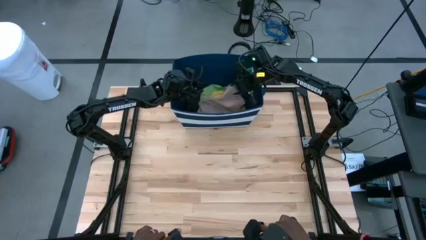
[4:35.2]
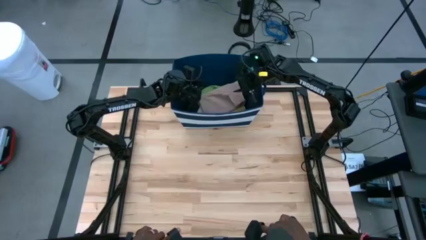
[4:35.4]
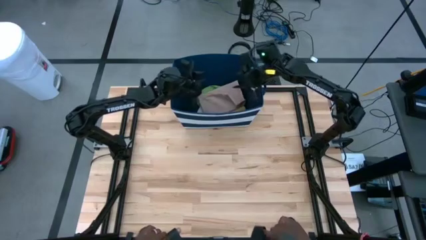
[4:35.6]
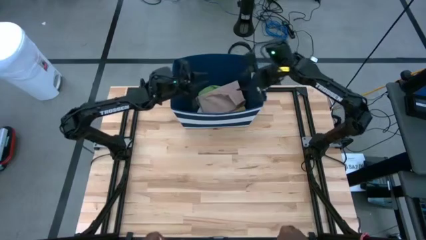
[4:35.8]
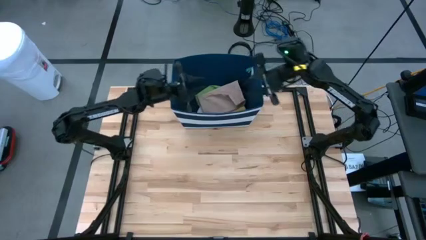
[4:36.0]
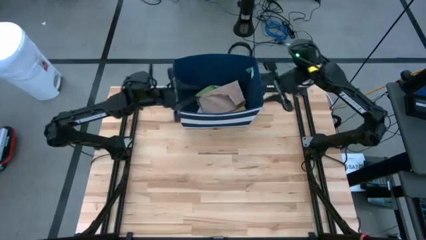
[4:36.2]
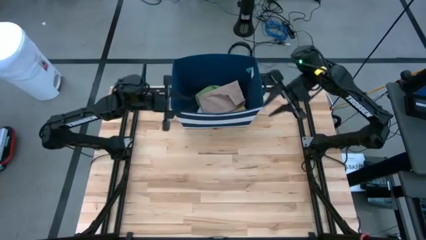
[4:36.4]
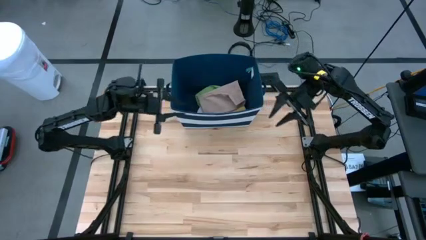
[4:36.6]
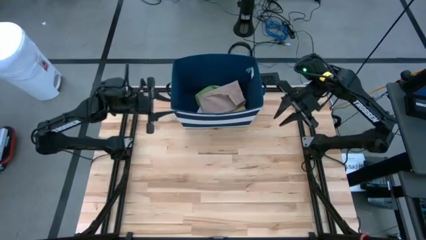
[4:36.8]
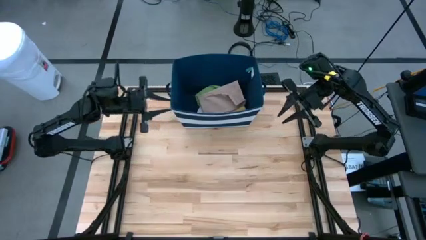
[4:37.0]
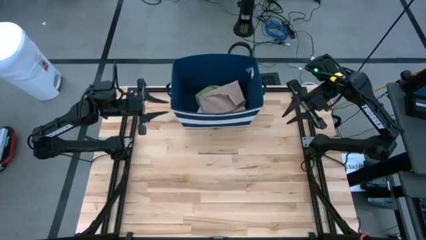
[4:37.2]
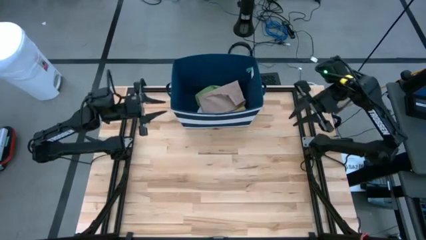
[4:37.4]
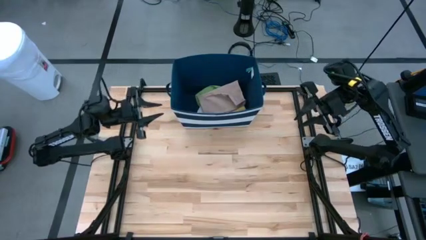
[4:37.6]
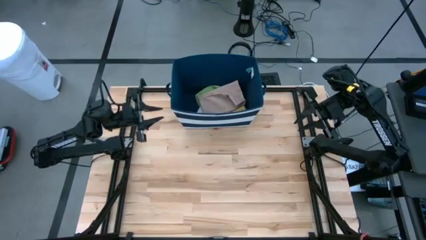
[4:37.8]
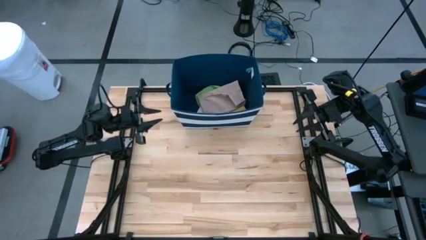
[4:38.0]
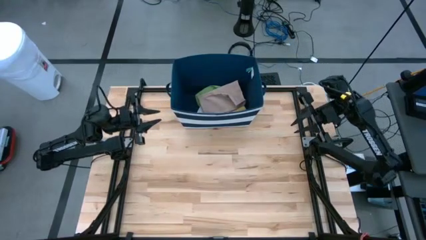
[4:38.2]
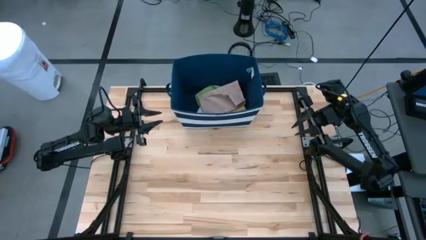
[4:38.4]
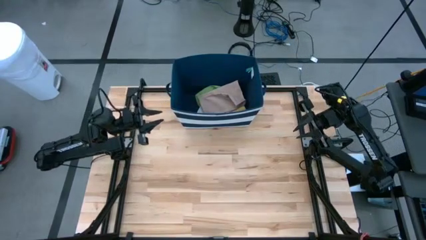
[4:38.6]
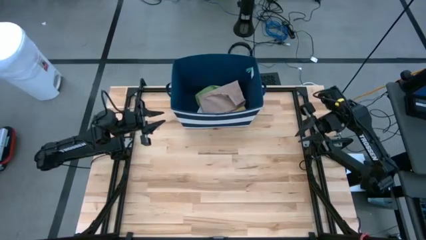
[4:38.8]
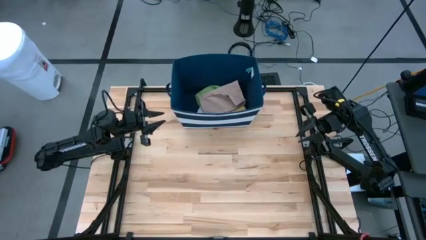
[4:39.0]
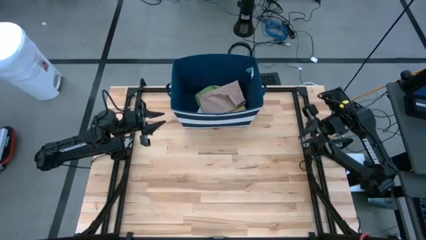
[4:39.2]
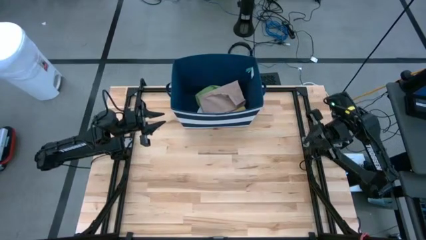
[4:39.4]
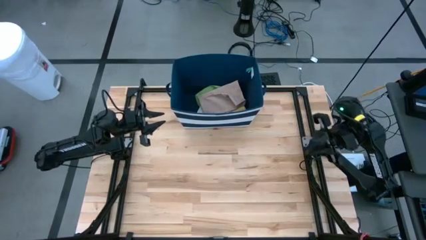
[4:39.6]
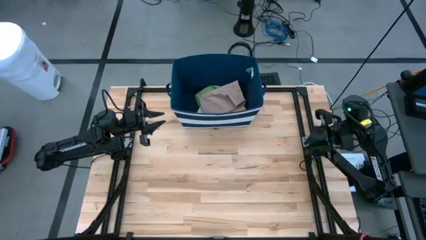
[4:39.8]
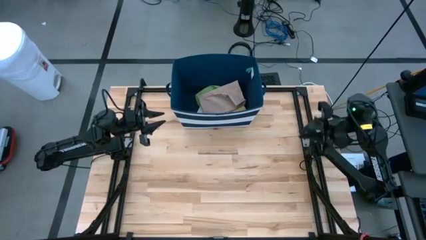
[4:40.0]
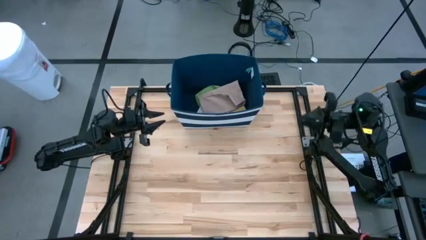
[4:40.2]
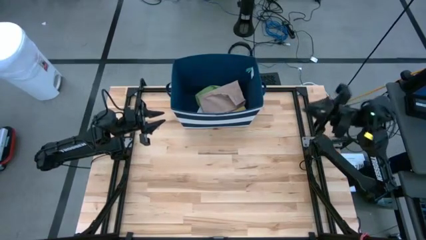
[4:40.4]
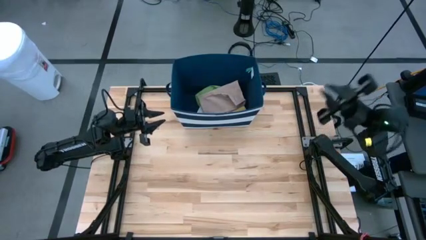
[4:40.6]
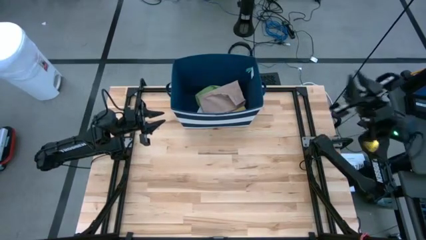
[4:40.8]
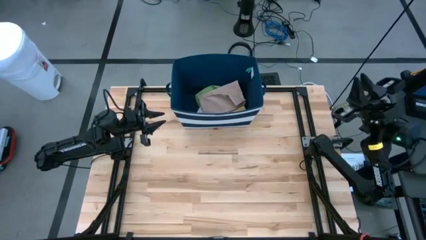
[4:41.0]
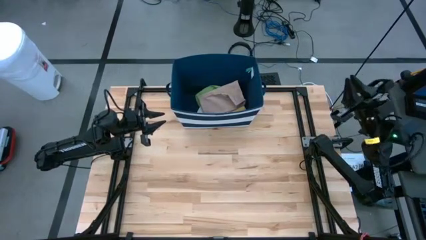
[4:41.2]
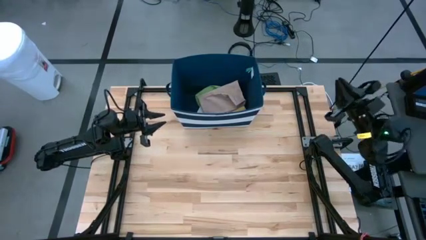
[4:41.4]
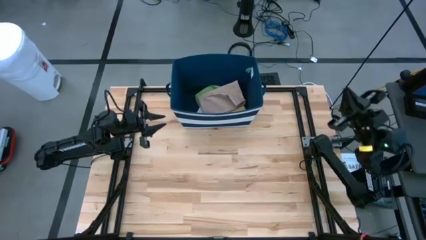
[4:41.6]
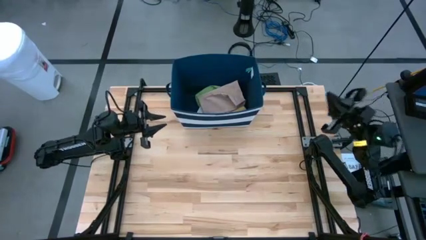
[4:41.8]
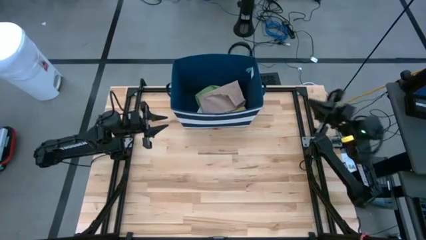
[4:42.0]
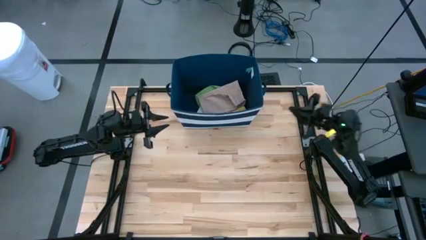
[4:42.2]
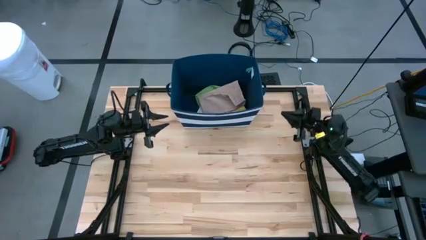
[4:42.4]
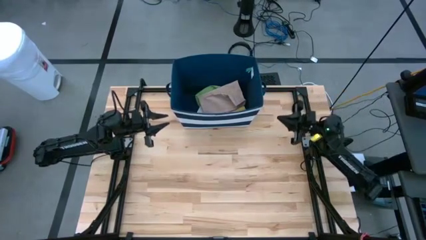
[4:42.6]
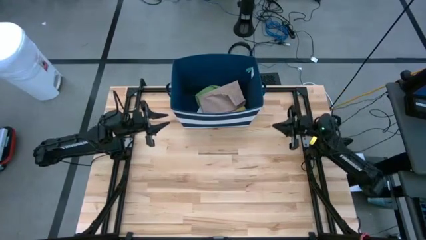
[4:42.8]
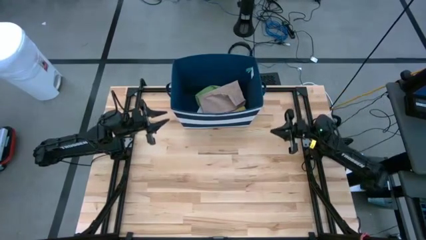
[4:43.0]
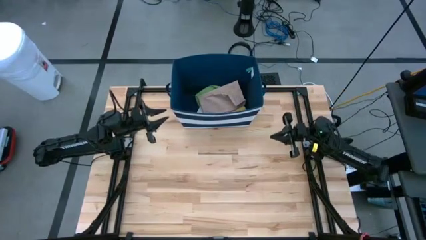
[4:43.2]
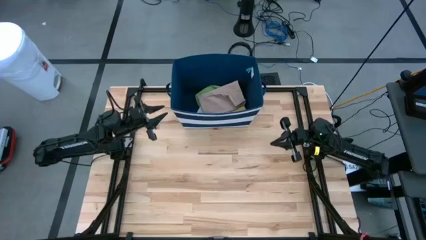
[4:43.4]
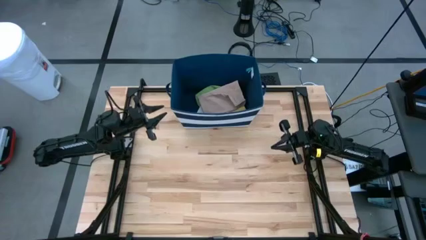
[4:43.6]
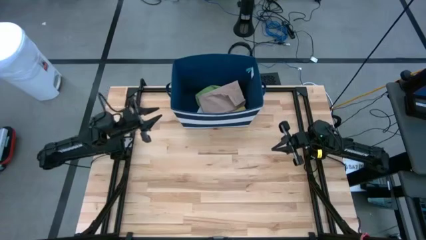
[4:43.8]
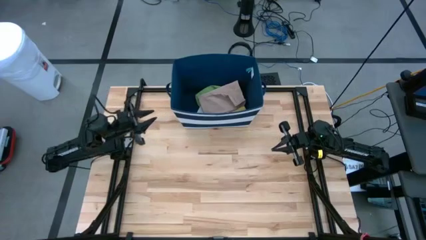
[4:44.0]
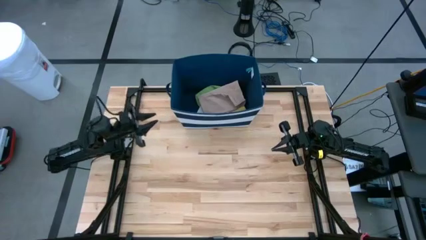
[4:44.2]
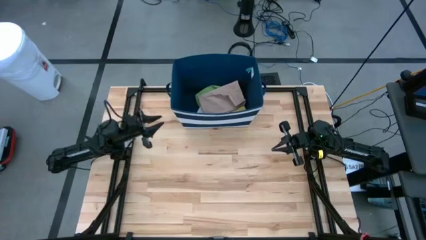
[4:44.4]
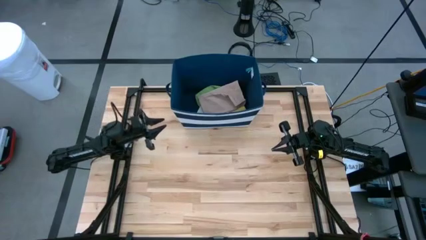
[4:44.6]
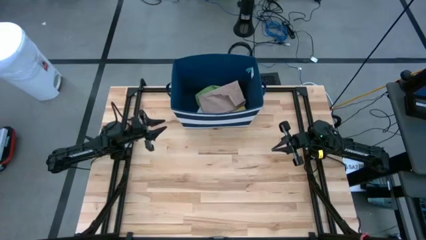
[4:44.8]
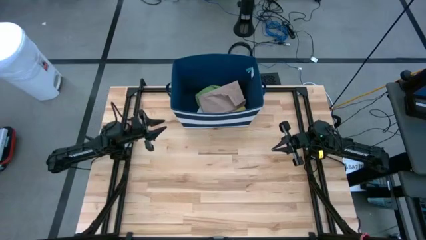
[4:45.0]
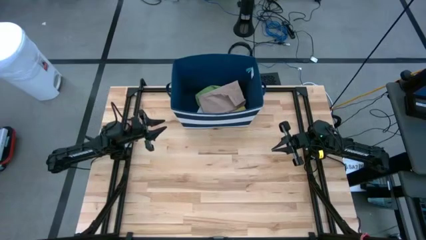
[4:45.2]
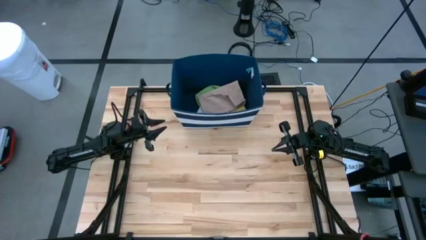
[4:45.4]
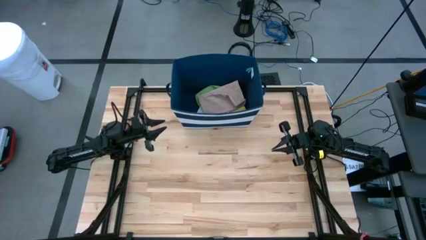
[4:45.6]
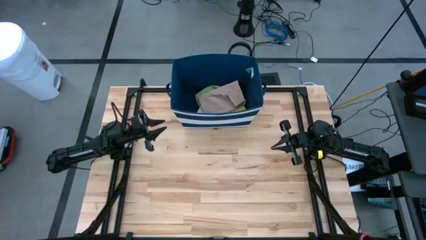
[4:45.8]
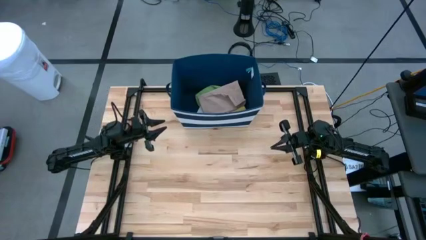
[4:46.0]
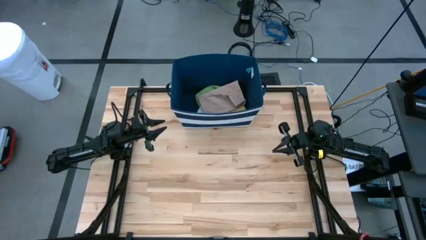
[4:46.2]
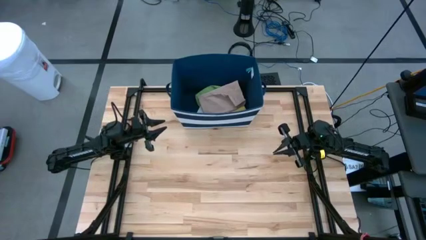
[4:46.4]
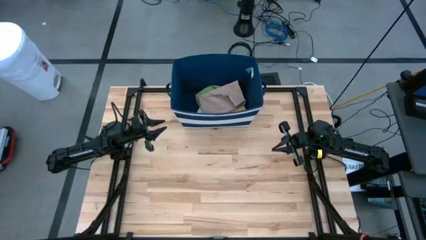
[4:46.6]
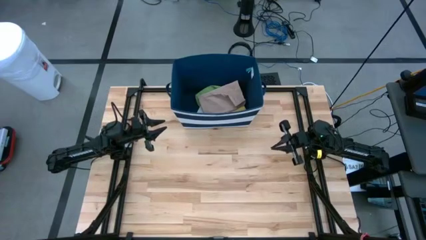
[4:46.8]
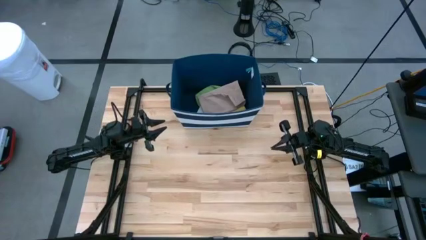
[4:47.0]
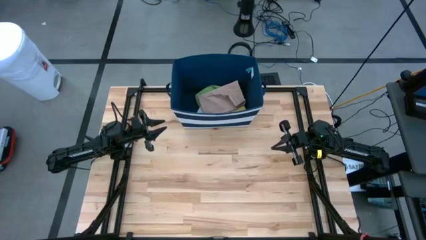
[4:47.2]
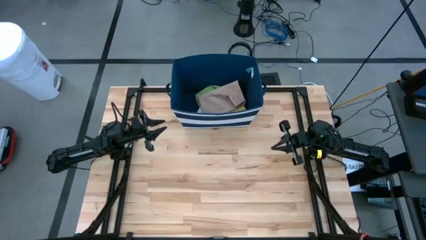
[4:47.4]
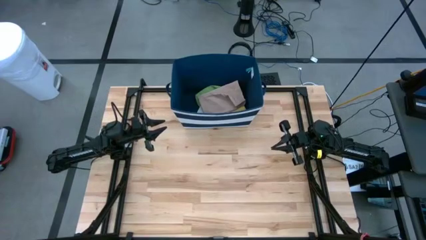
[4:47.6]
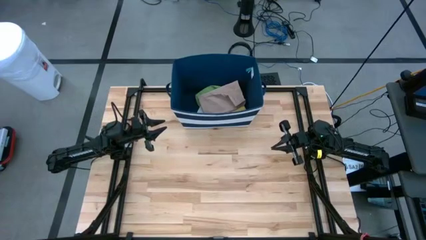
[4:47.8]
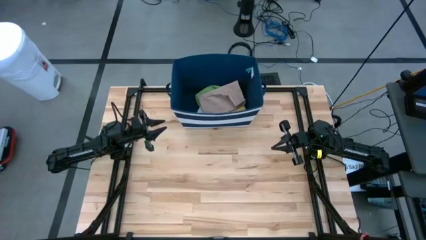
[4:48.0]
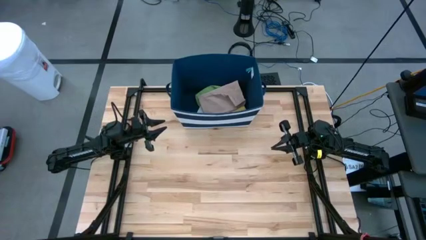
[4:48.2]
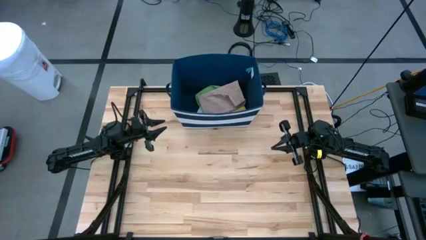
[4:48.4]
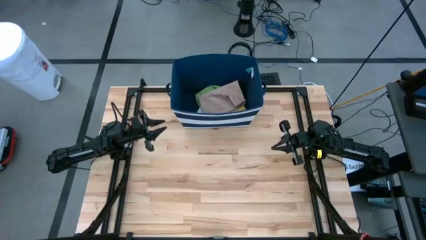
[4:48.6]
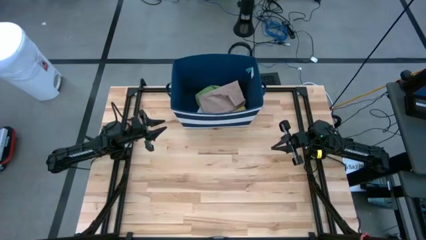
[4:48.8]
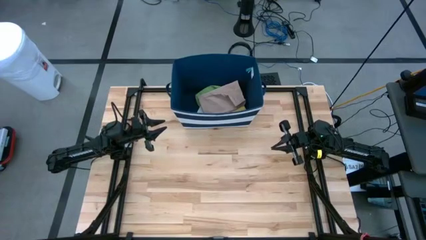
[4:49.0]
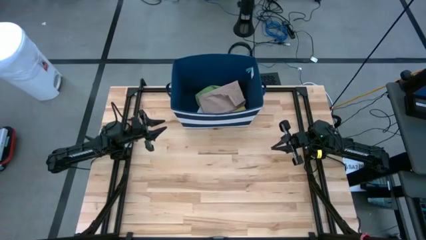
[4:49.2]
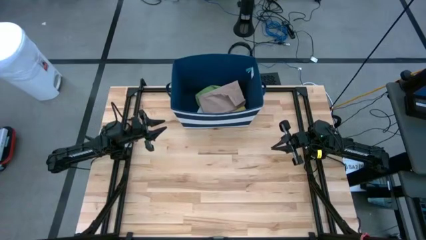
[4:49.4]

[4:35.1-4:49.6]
Task: Fold towel
Return to Home Position
